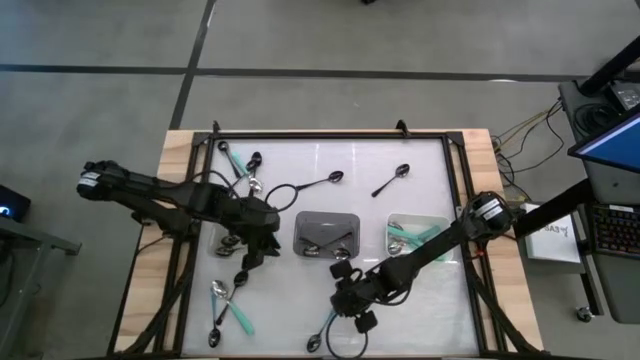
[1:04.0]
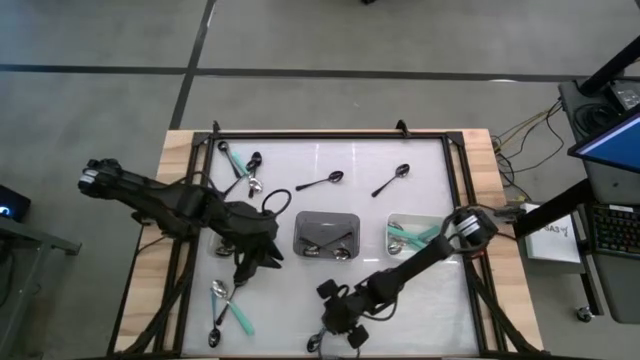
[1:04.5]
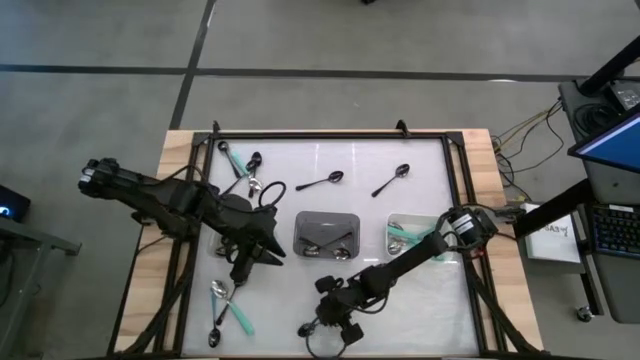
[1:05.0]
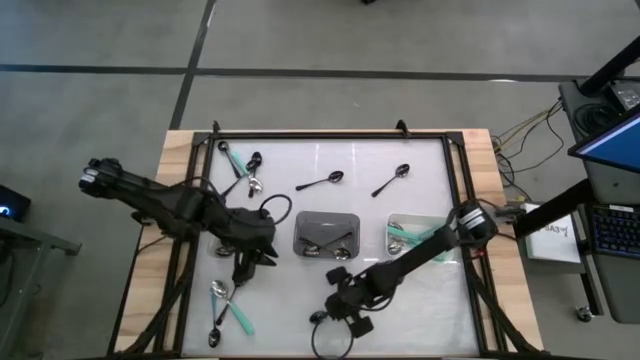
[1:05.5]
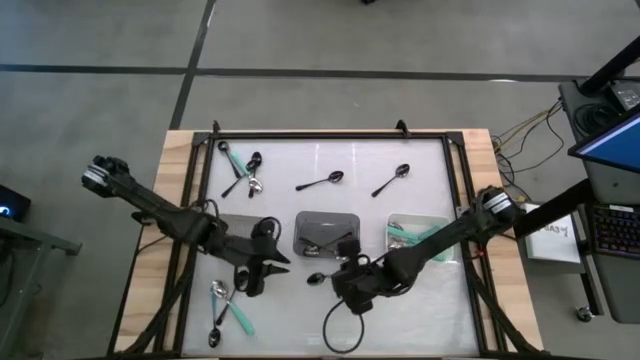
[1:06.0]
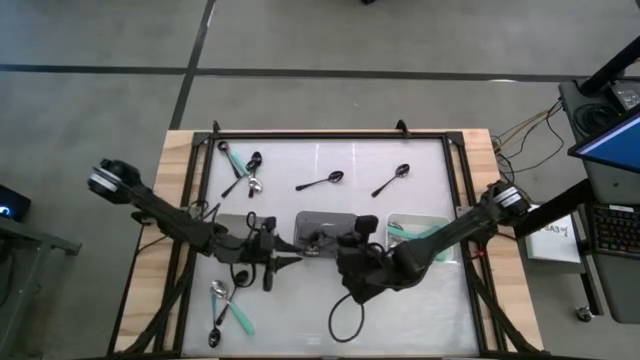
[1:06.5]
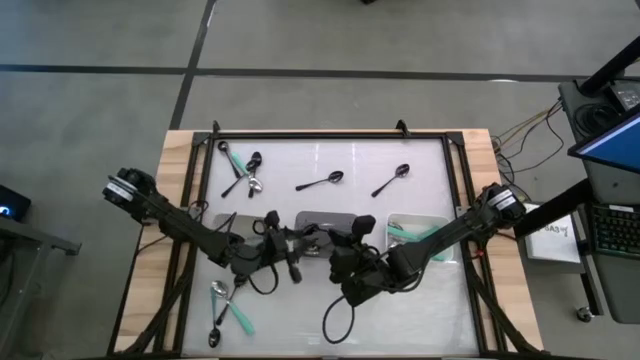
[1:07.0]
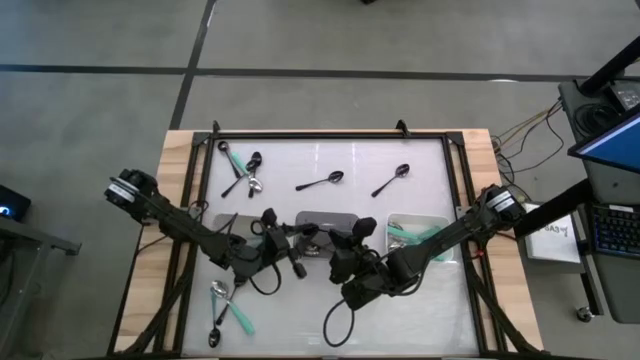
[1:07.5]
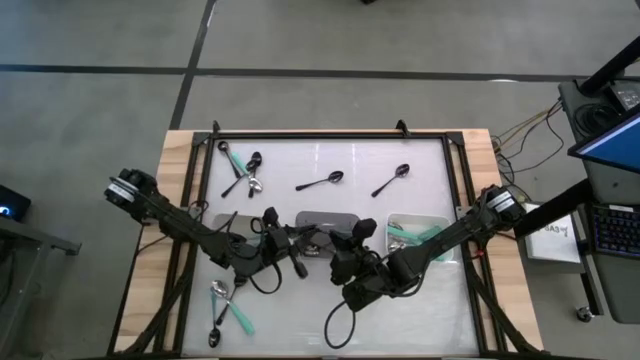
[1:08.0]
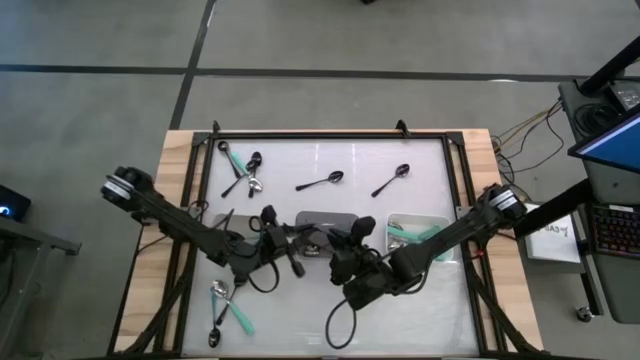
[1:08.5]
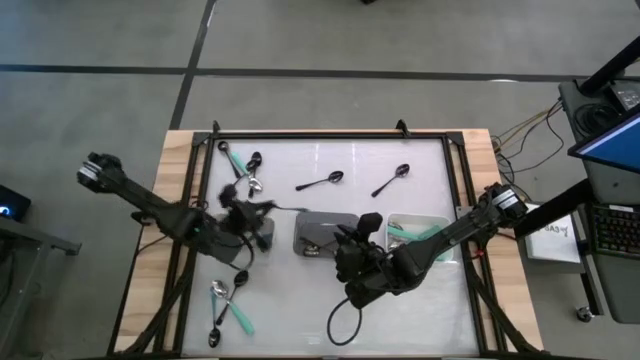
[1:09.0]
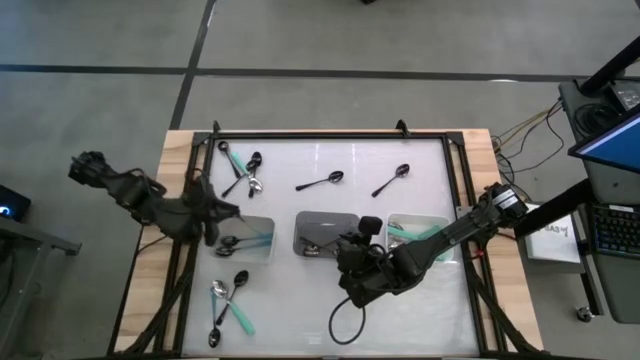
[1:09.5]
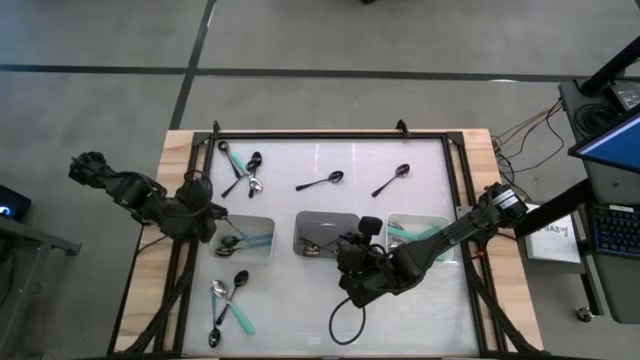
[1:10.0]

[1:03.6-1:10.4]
Task: Sort silverware by color (type)
Put the blue spoon into the gray bin

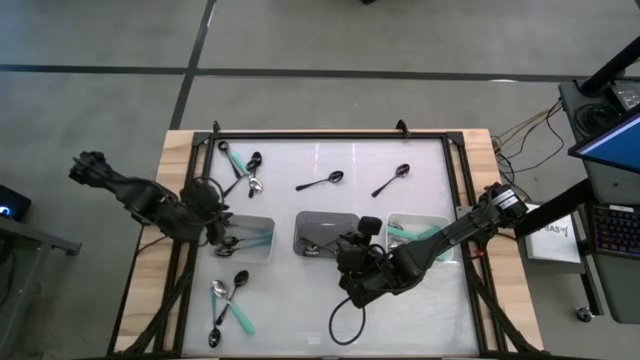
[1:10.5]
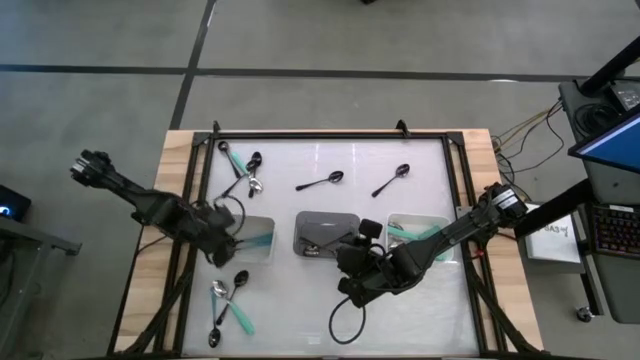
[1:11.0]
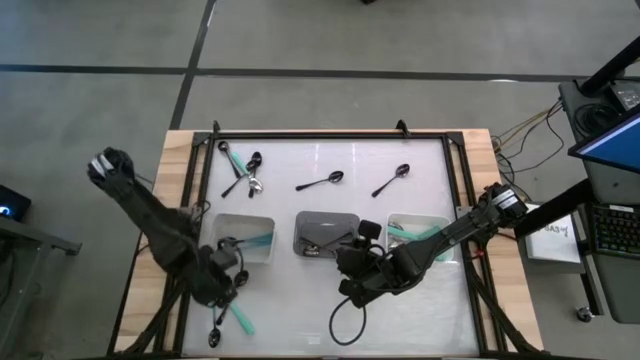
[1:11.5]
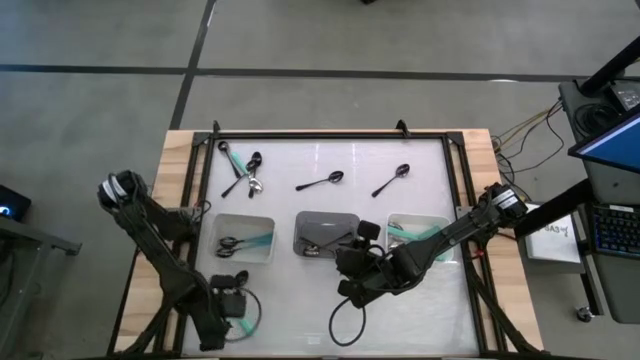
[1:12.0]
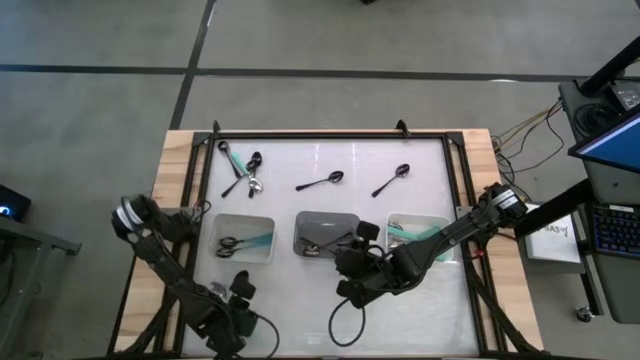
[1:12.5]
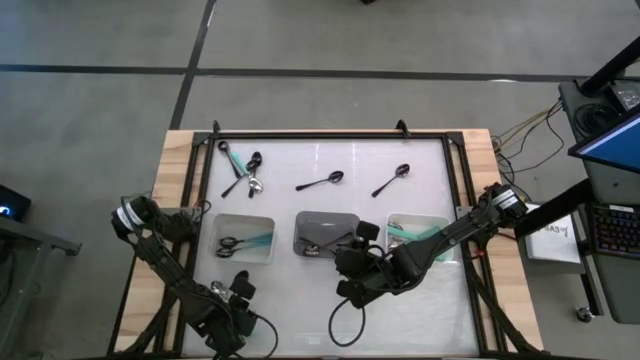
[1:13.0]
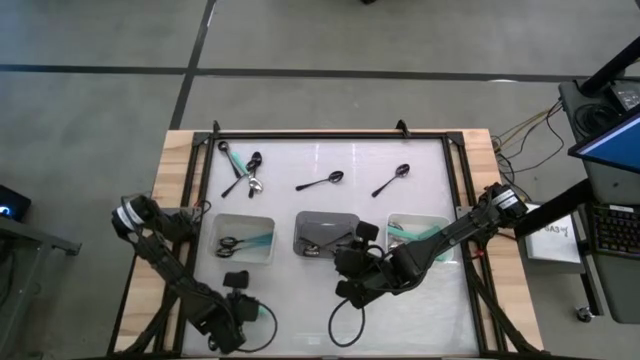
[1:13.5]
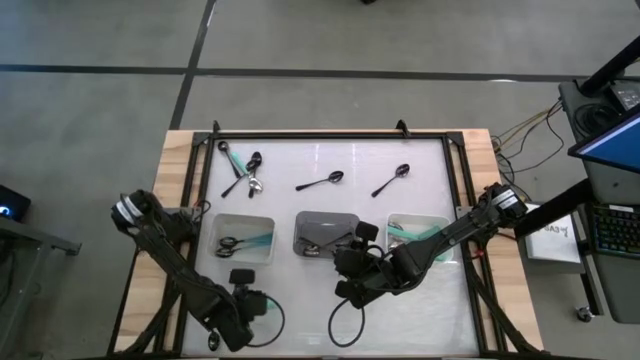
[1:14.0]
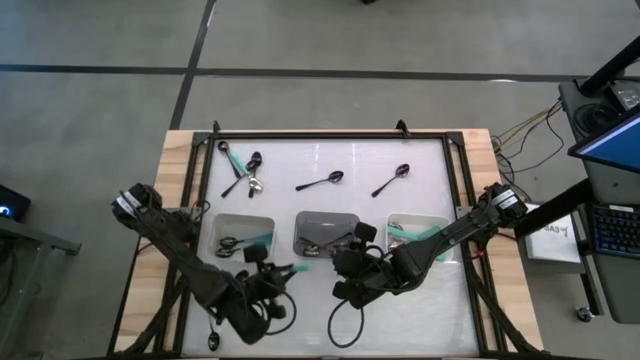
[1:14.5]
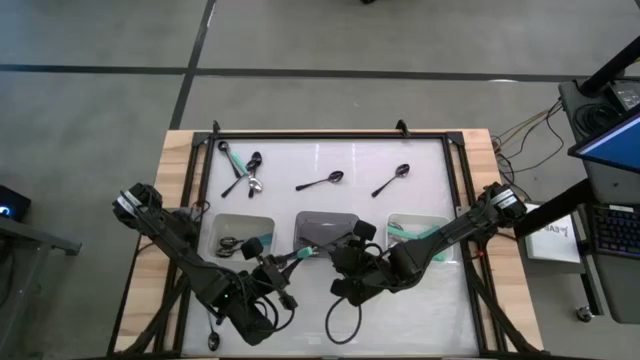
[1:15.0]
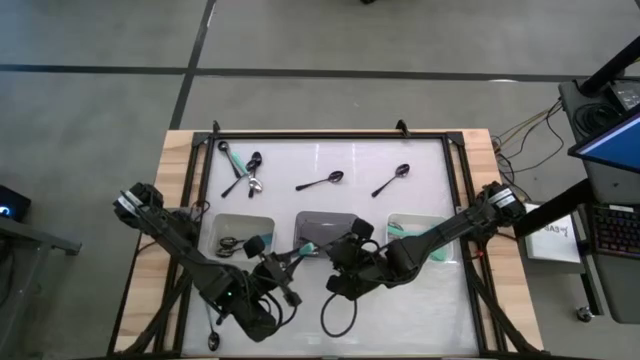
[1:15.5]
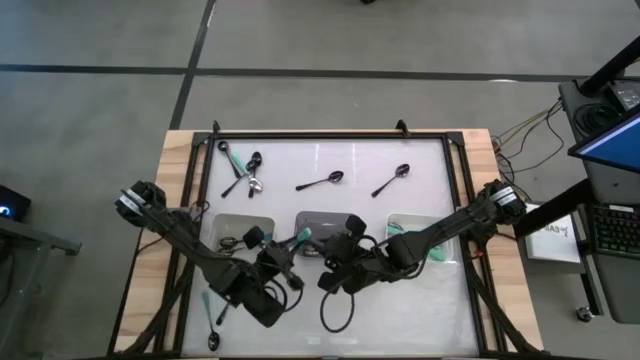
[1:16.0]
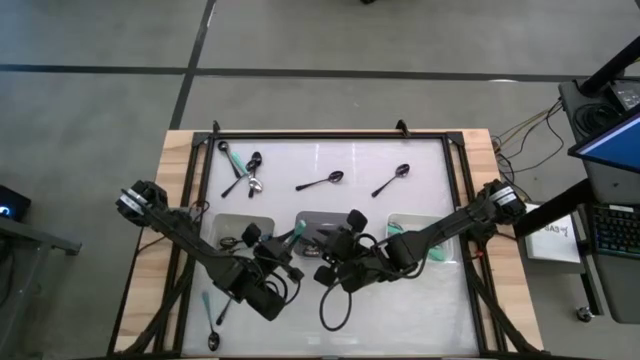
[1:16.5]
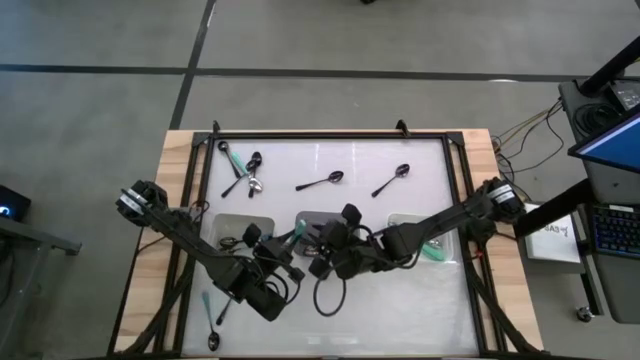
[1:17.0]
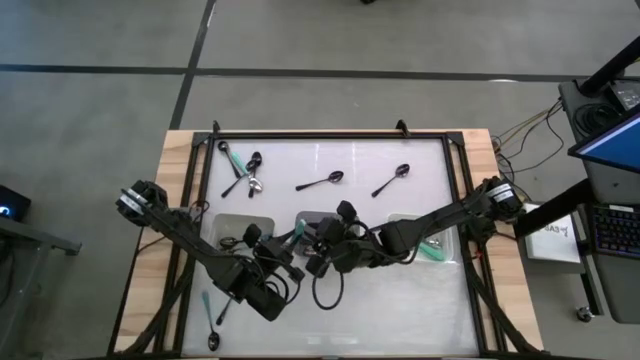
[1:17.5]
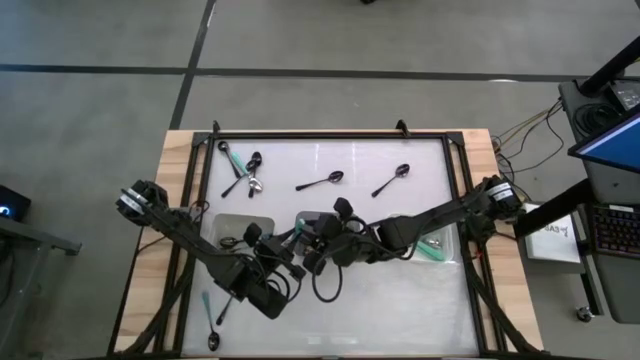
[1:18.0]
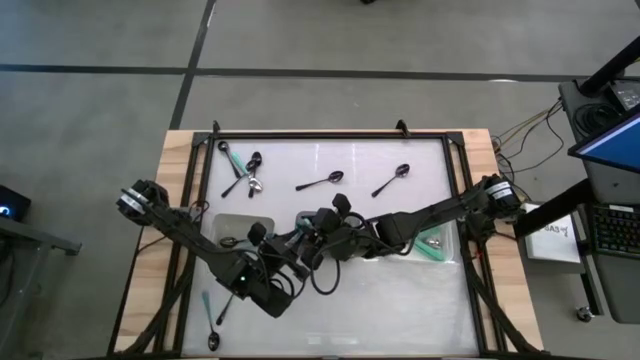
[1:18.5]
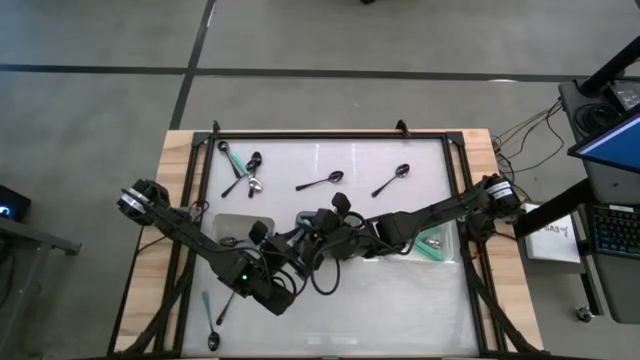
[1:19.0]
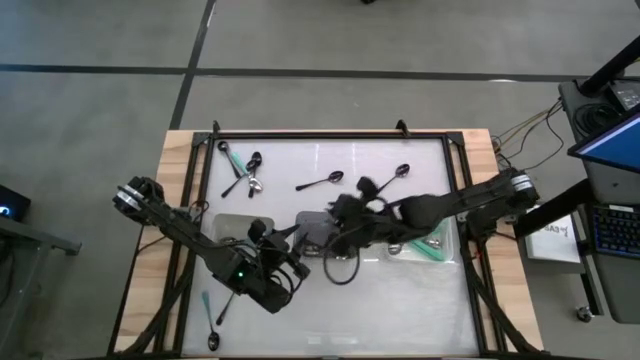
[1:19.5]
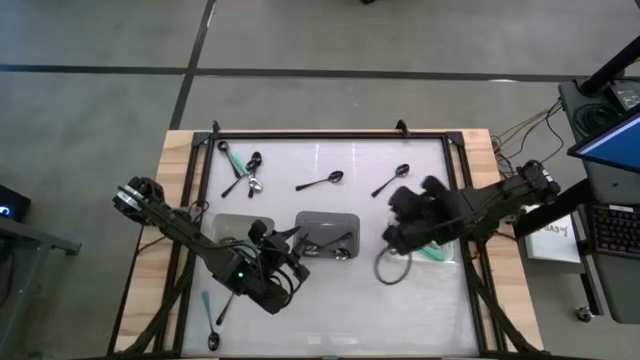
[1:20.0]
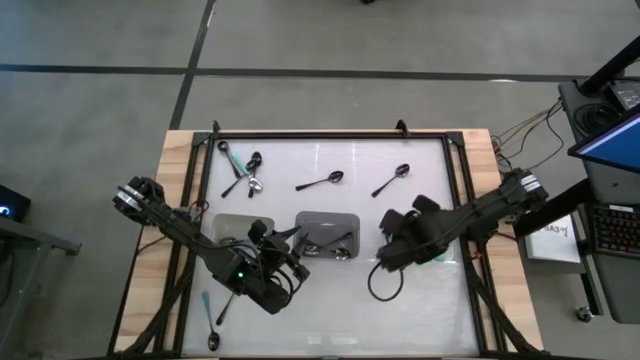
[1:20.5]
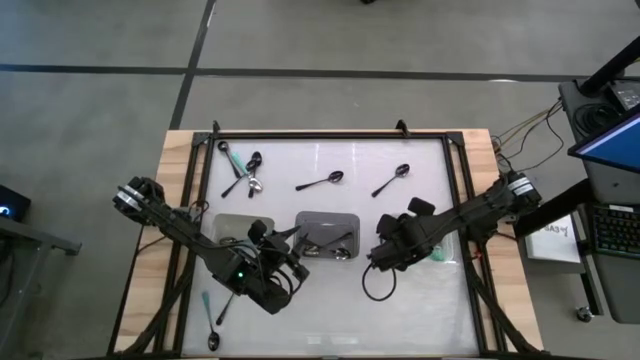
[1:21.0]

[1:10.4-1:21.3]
Put the green spoon into the white bin

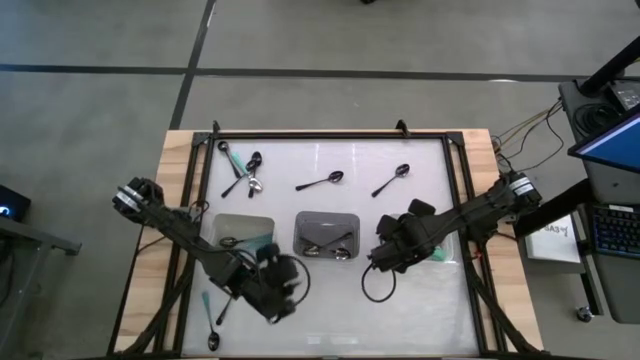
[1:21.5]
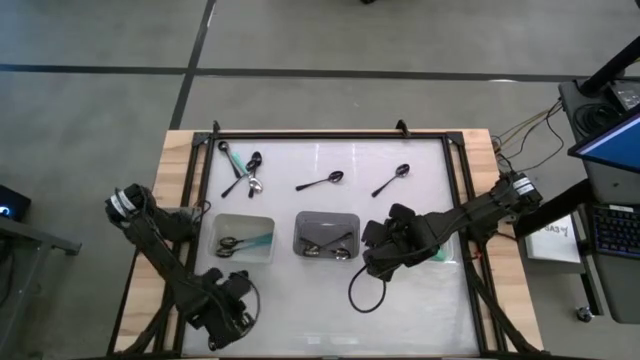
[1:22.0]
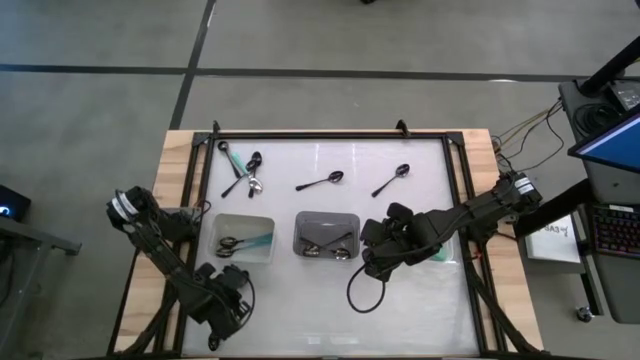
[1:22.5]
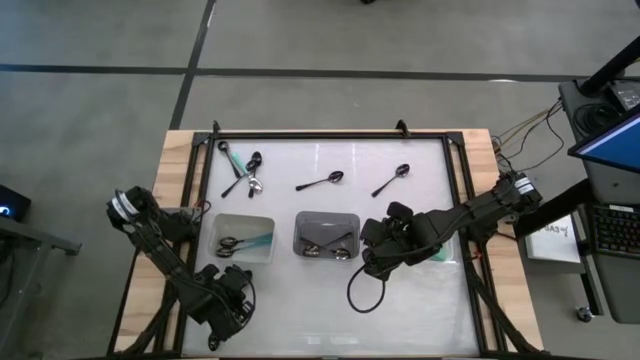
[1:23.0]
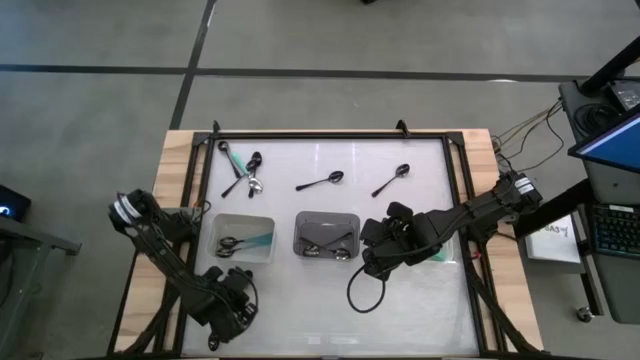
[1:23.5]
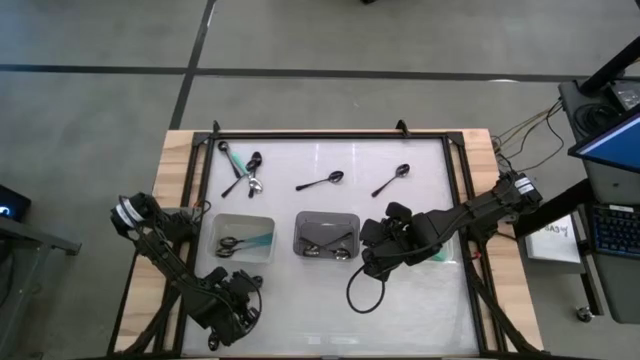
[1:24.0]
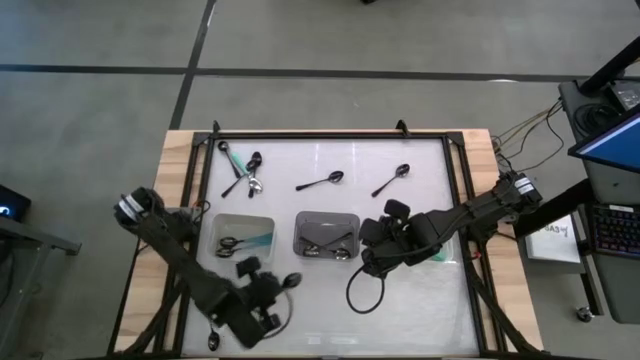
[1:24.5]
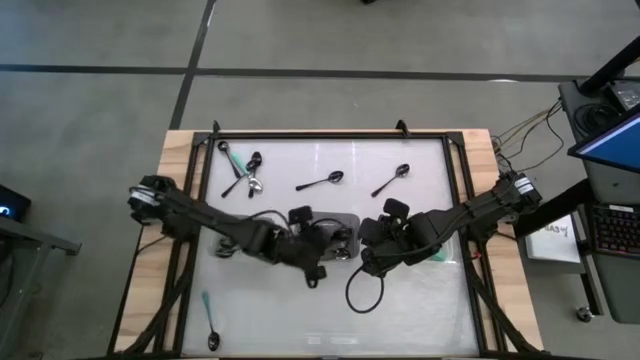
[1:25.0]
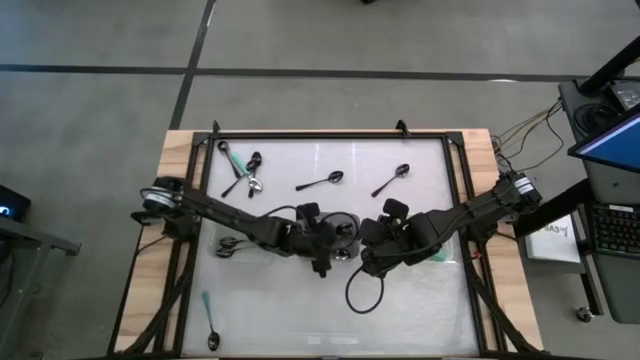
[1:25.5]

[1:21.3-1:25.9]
Put the black spoon into the black bin

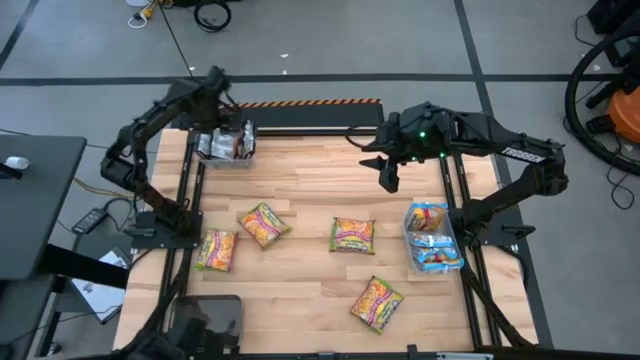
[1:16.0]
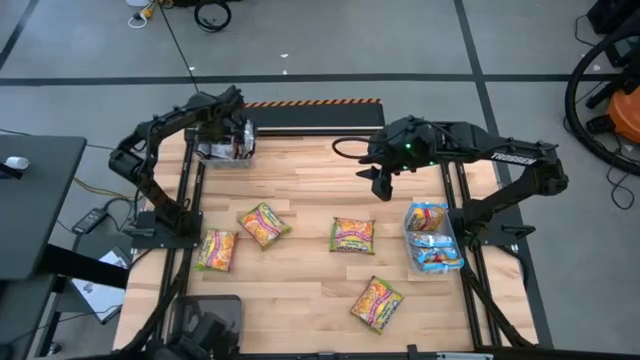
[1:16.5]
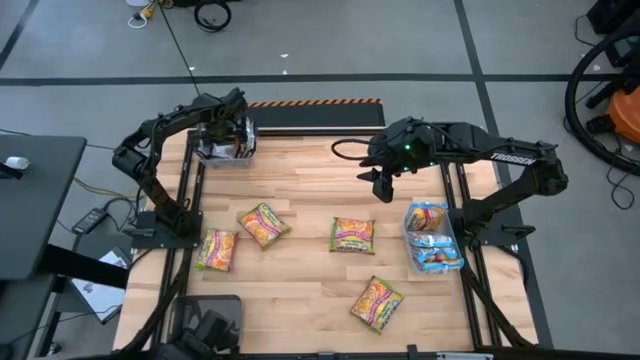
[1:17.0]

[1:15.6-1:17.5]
Task: Sort Maruchan noodles
Adjust the black noodle pack in the top transparent bin
